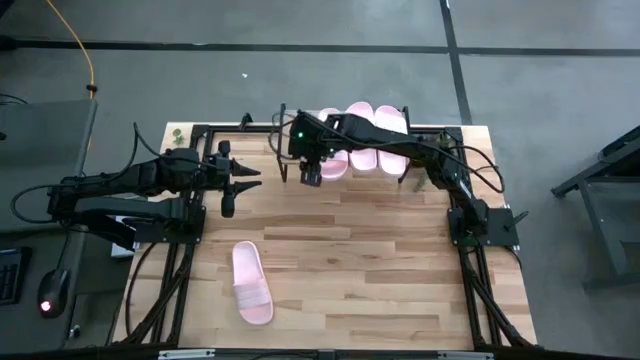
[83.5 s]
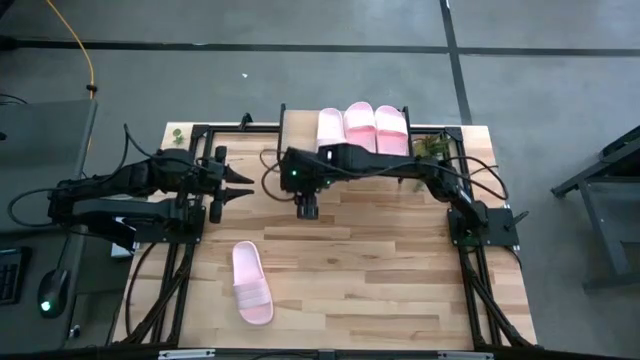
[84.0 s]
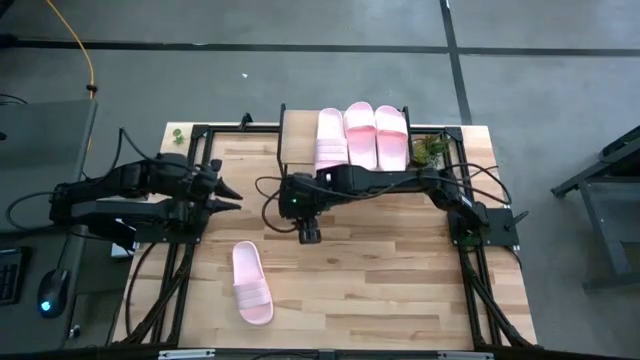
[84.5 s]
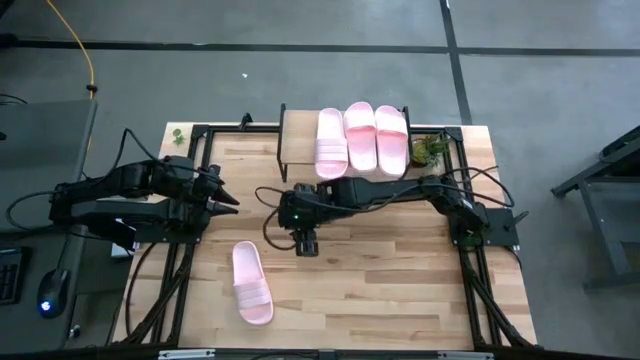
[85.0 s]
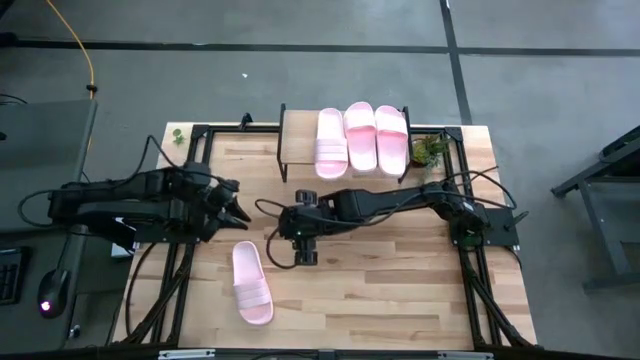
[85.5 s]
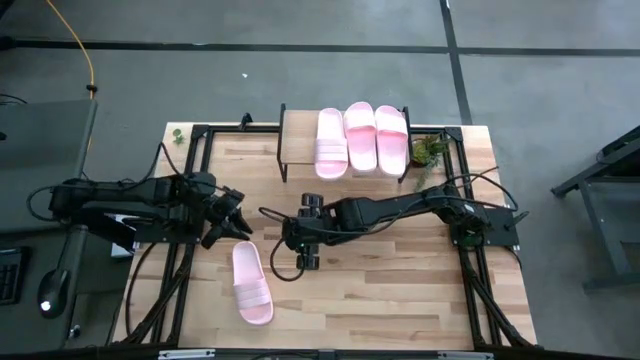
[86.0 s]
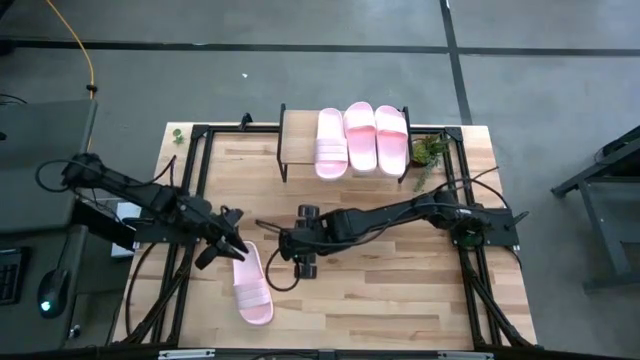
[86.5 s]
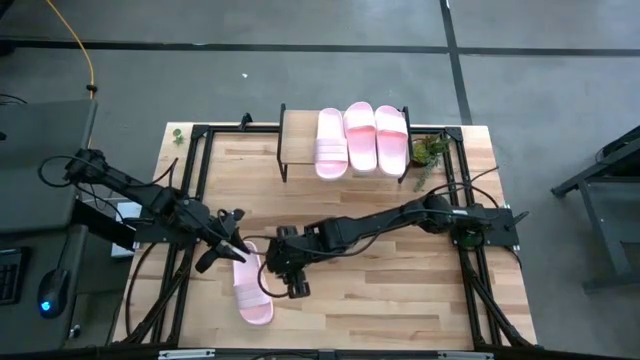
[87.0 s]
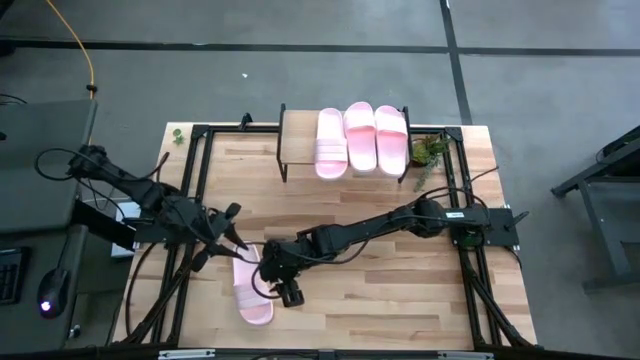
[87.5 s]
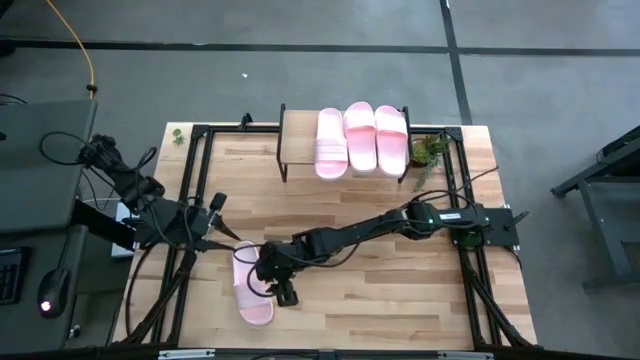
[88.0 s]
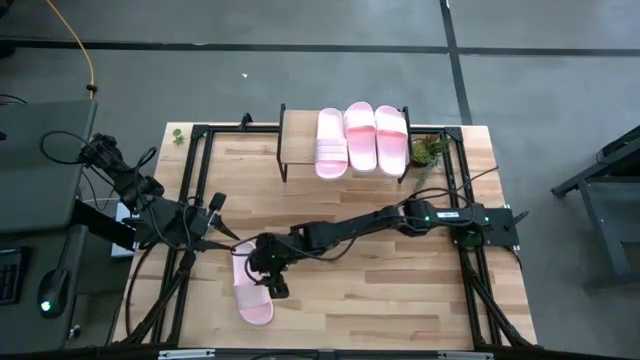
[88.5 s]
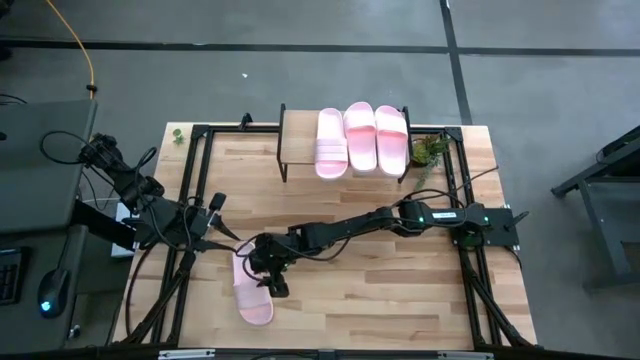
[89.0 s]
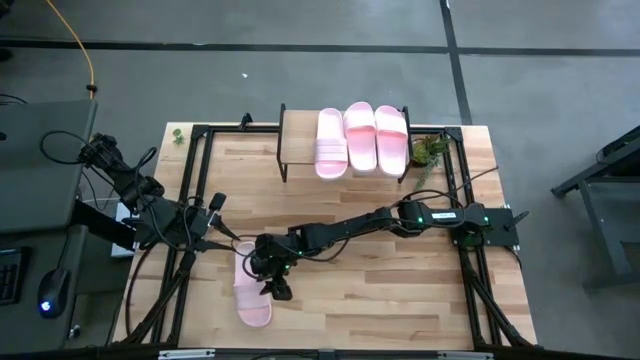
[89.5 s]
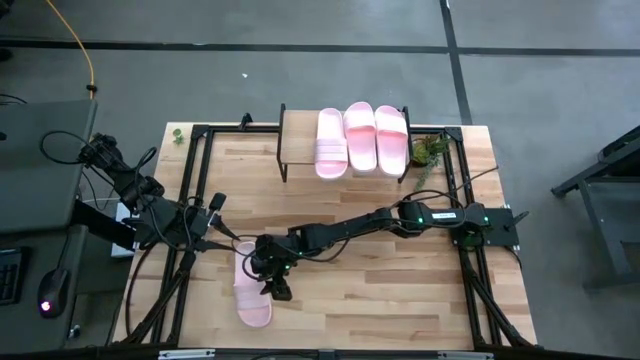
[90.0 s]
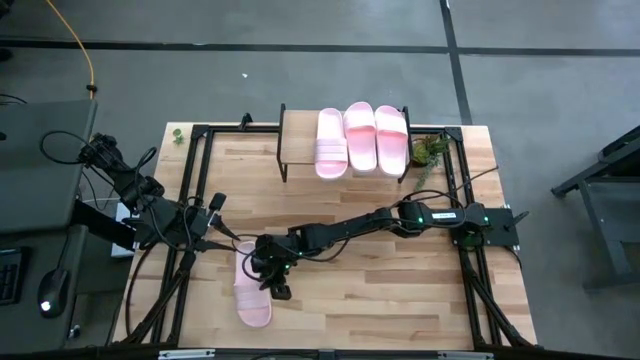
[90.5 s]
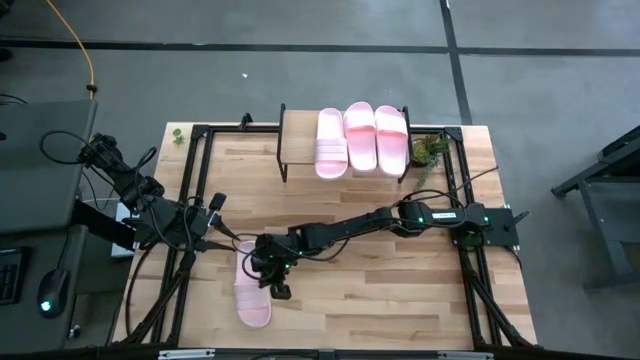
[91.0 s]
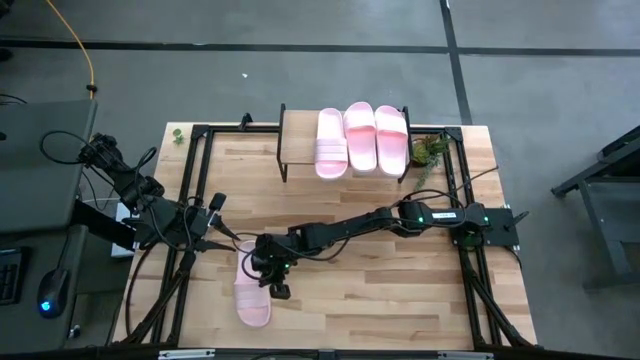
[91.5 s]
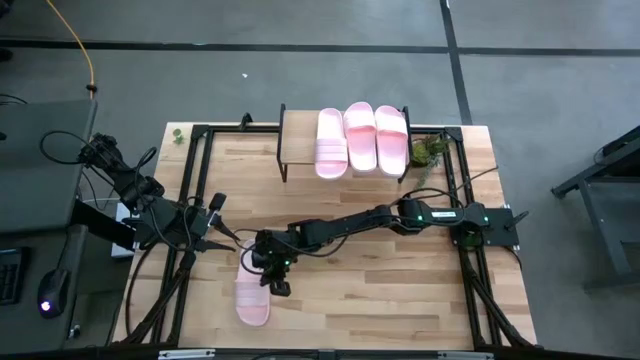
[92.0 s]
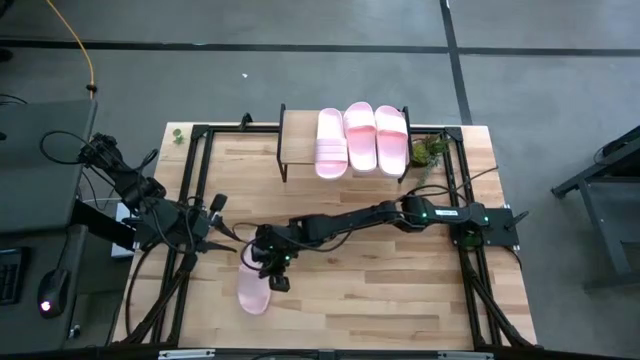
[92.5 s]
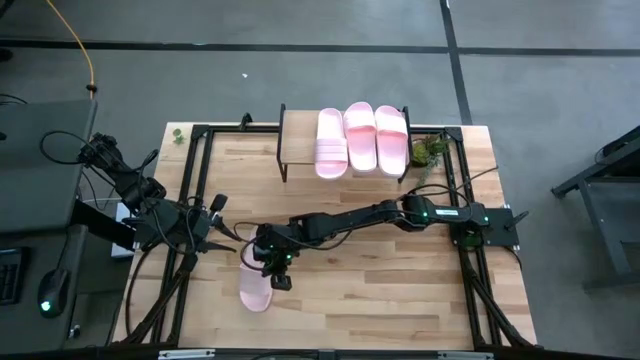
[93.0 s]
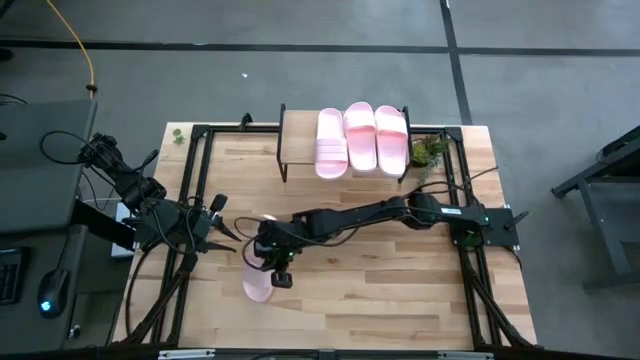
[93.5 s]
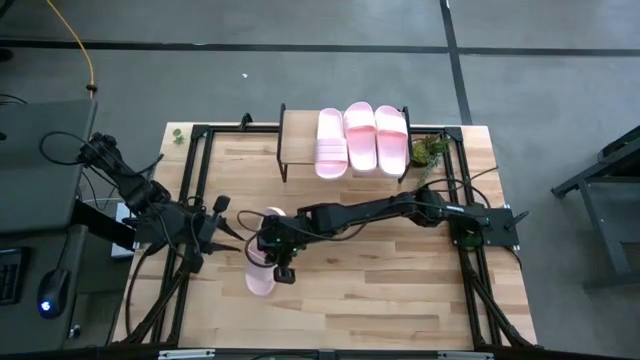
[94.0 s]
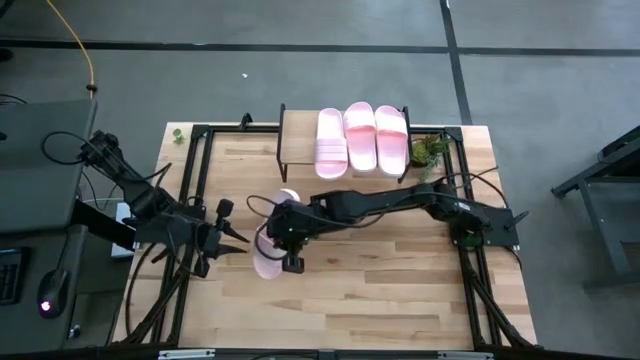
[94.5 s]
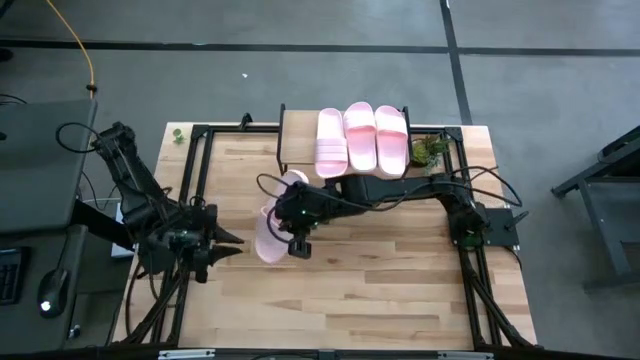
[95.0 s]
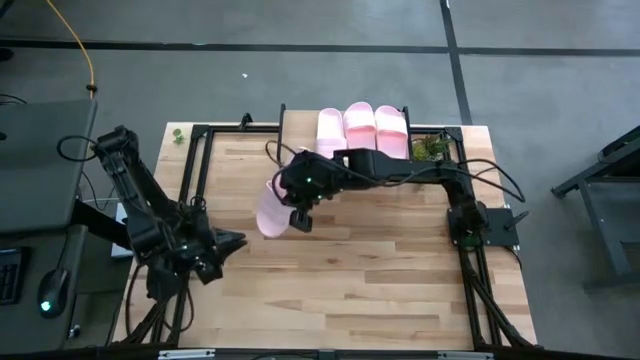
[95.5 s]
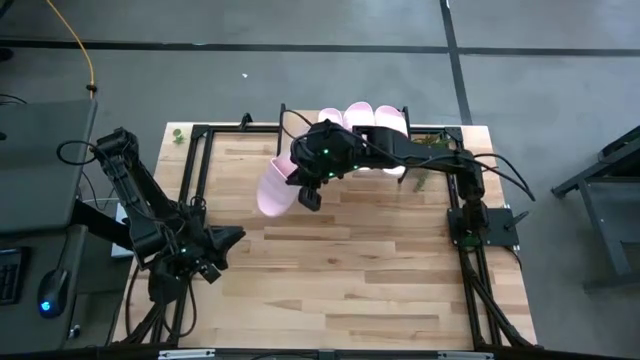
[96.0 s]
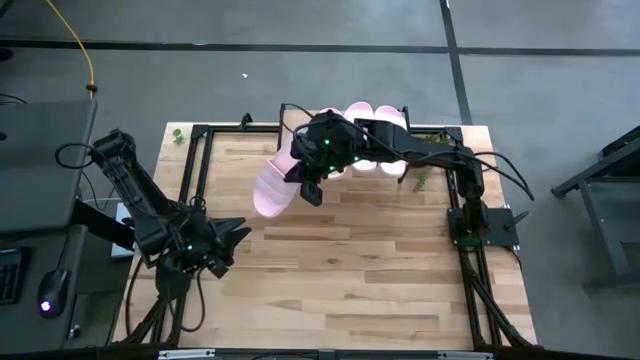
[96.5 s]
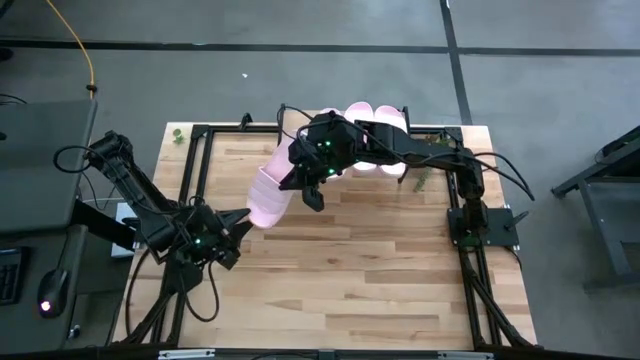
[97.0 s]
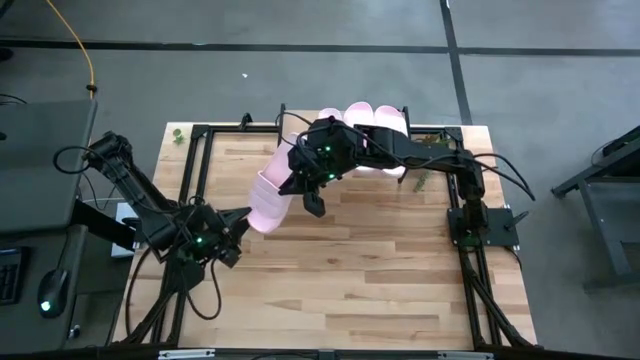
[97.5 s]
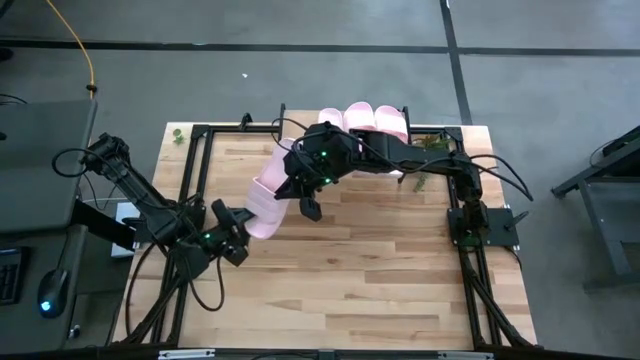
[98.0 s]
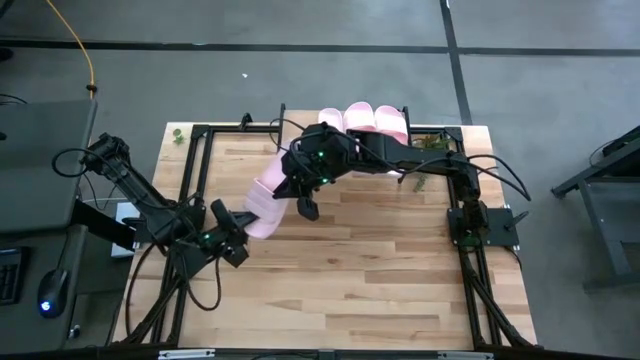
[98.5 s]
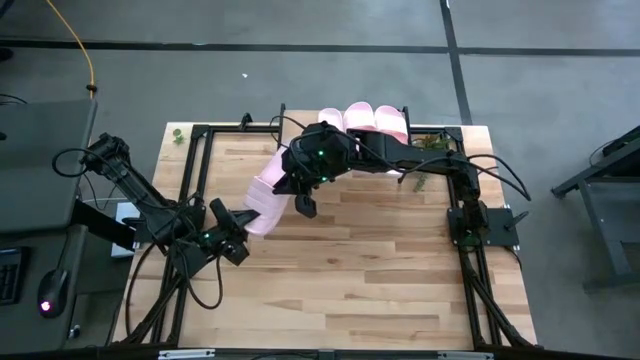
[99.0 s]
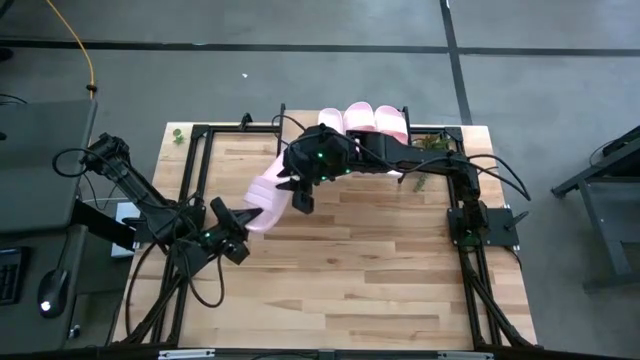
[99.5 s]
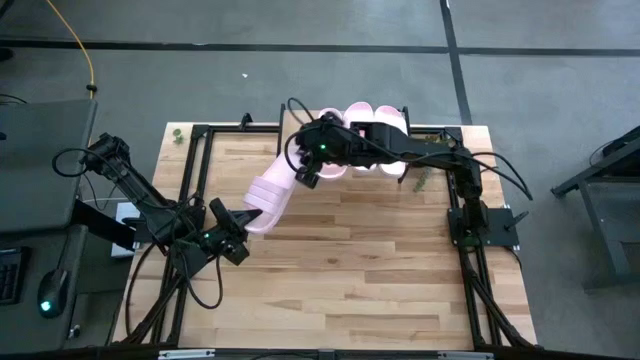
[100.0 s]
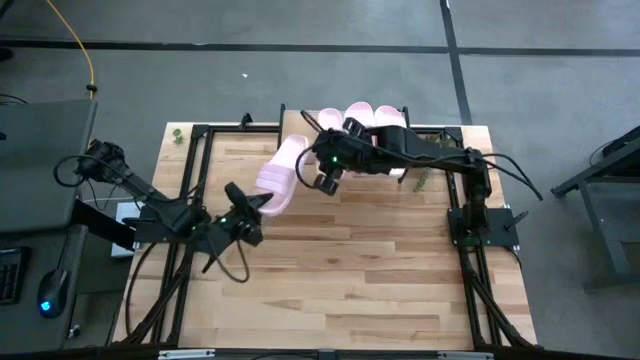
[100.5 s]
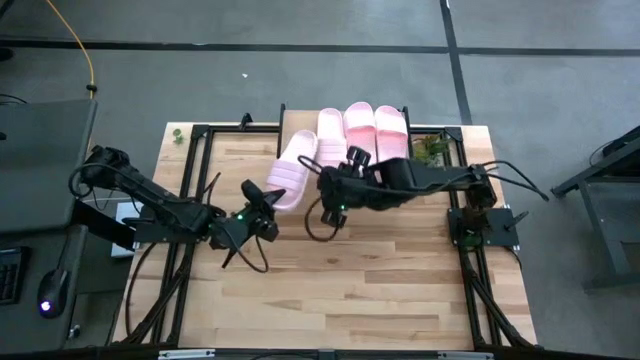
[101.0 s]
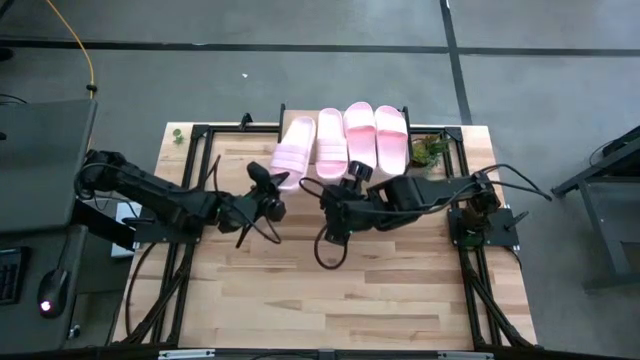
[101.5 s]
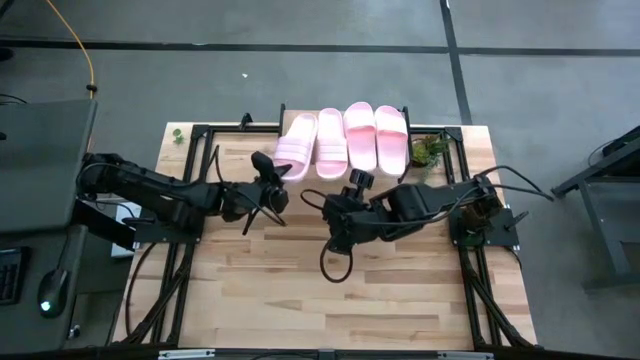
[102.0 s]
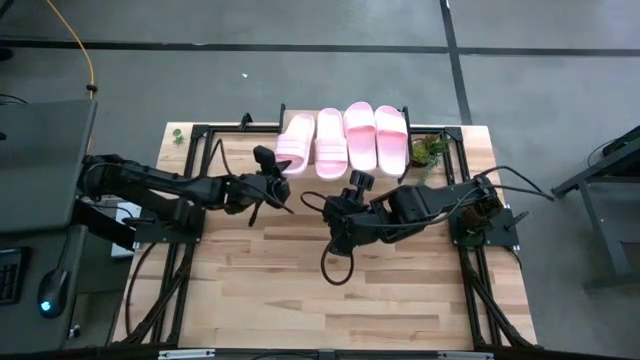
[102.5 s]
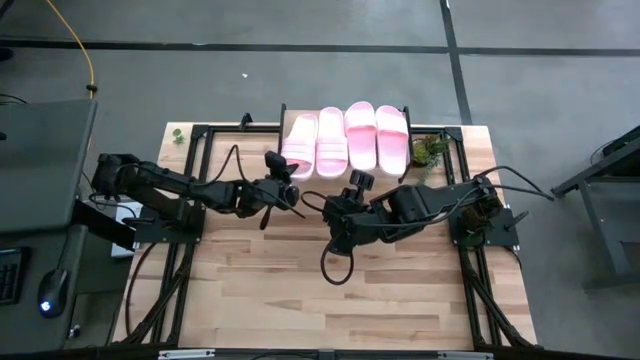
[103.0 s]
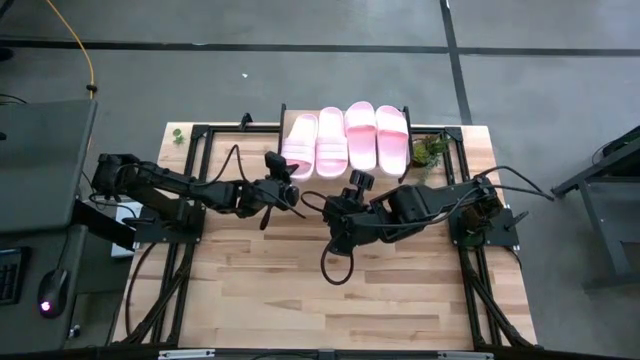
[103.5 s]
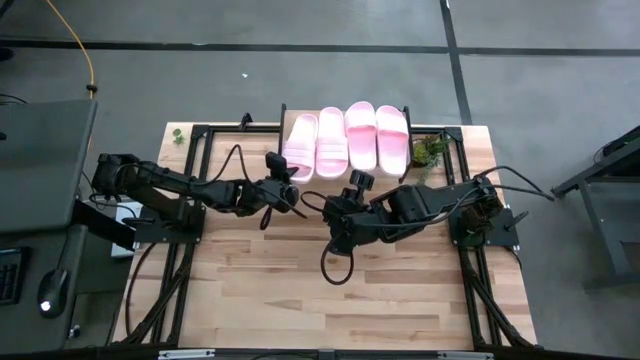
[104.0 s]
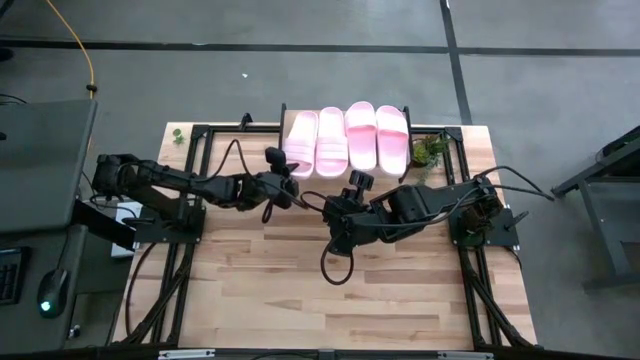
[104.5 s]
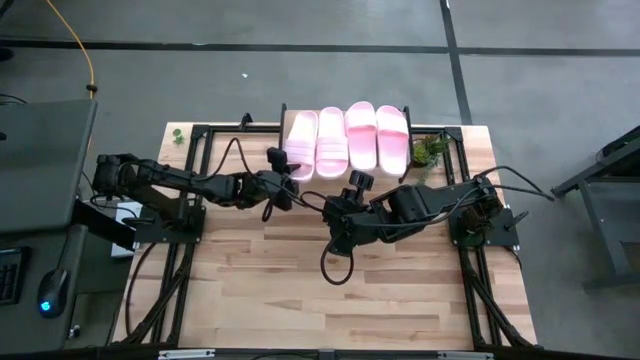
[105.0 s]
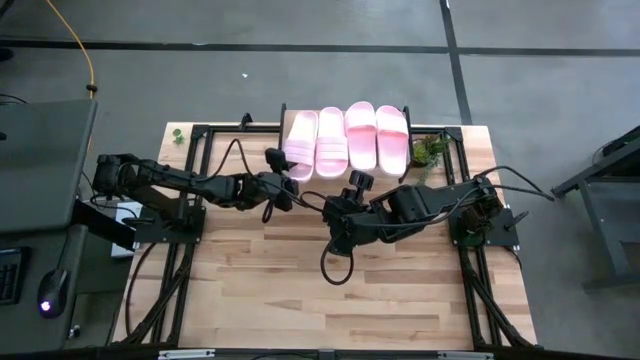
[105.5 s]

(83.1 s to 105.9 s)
Task: Pick and place slides into the shelf
Put the pink slide on the shelf
